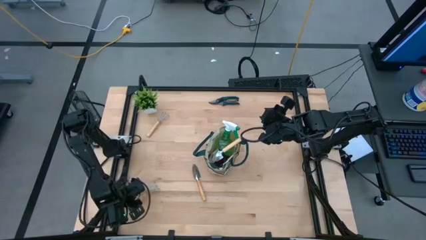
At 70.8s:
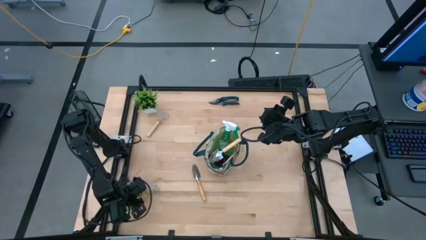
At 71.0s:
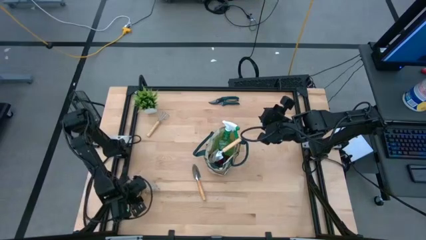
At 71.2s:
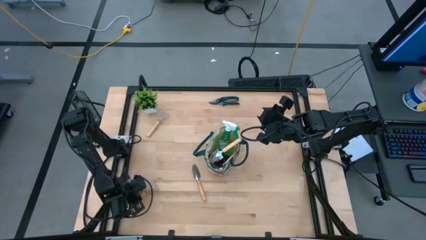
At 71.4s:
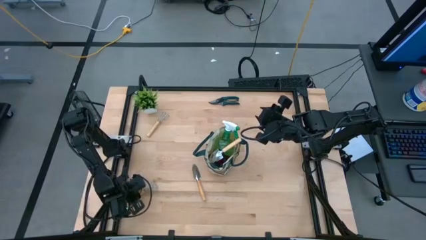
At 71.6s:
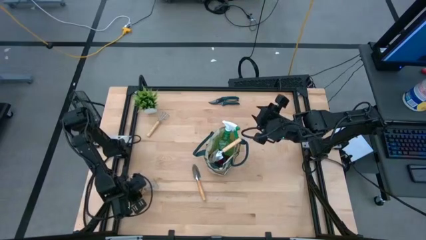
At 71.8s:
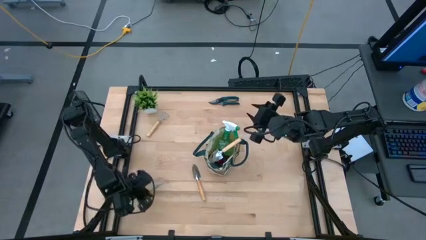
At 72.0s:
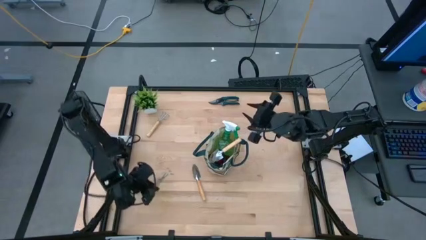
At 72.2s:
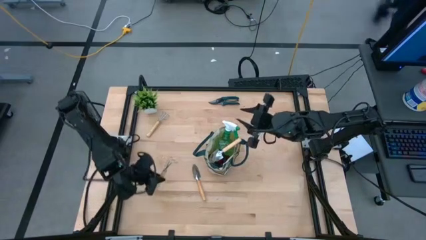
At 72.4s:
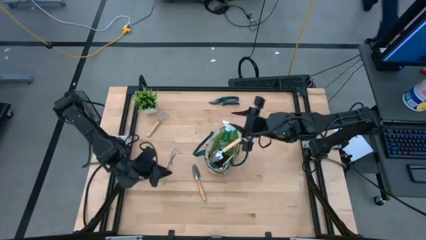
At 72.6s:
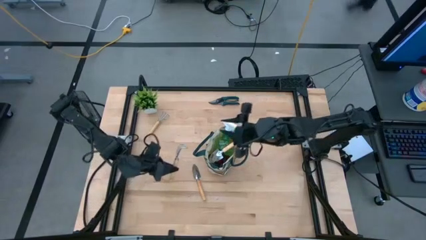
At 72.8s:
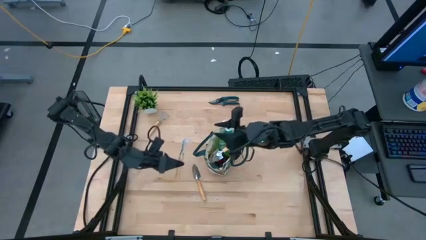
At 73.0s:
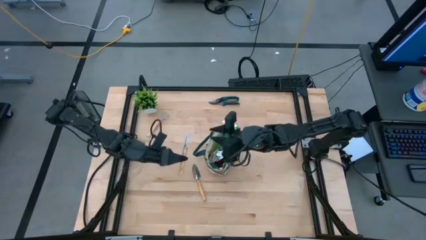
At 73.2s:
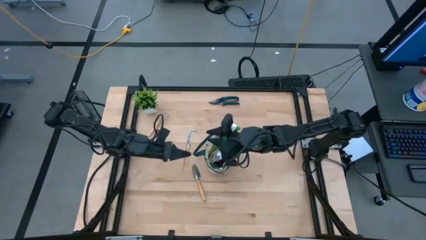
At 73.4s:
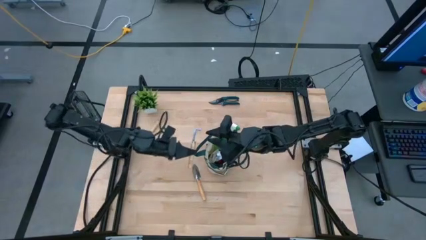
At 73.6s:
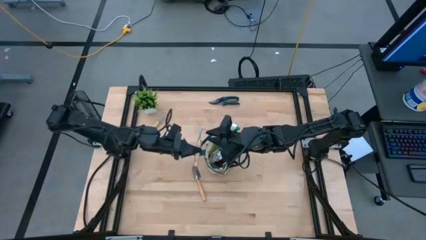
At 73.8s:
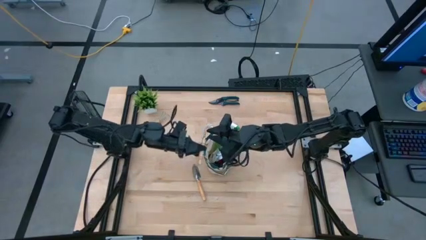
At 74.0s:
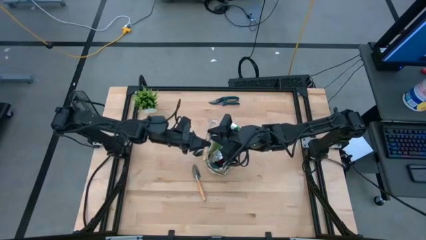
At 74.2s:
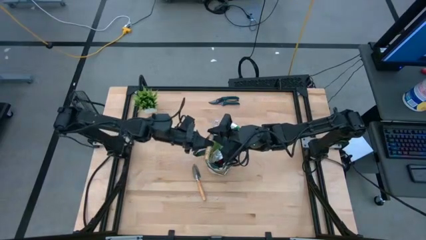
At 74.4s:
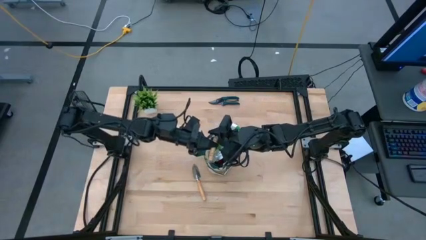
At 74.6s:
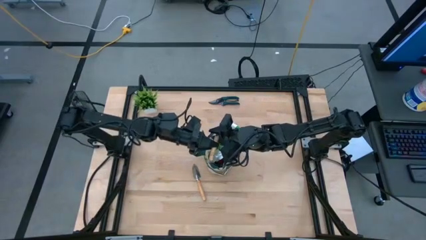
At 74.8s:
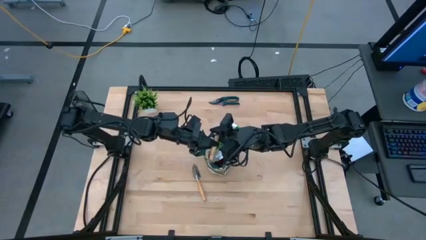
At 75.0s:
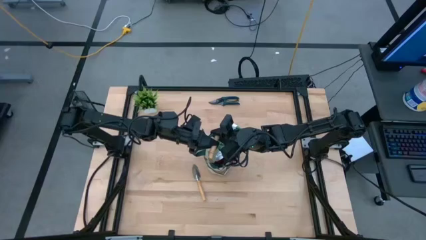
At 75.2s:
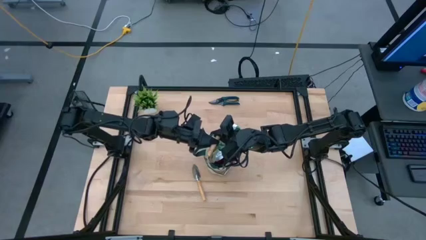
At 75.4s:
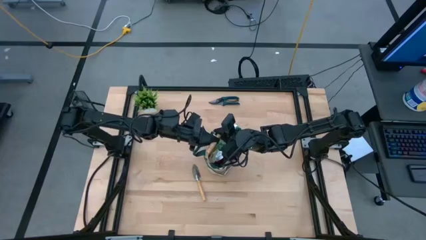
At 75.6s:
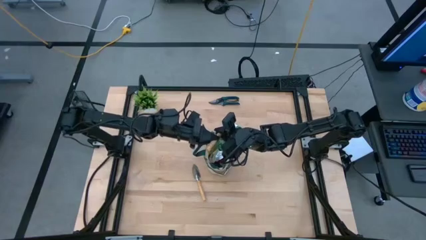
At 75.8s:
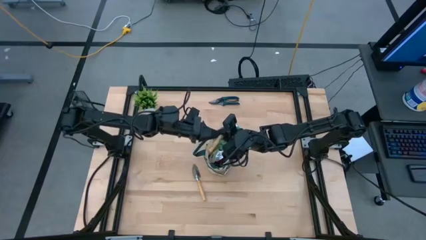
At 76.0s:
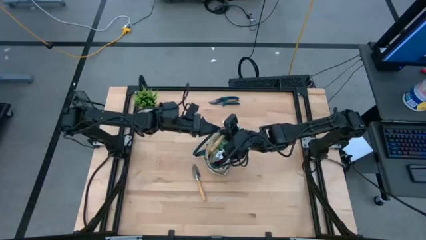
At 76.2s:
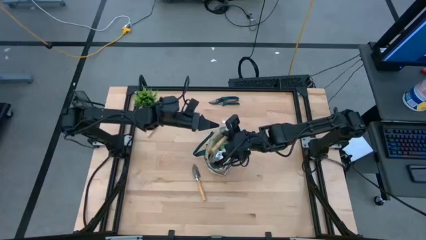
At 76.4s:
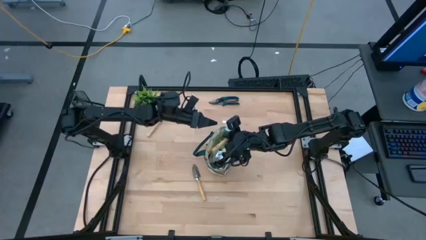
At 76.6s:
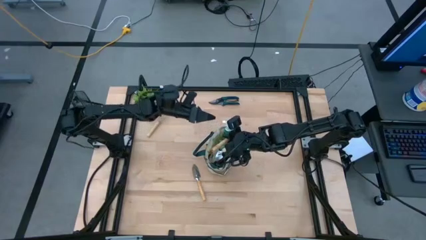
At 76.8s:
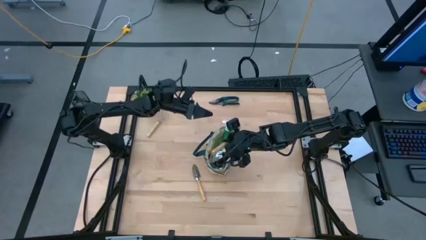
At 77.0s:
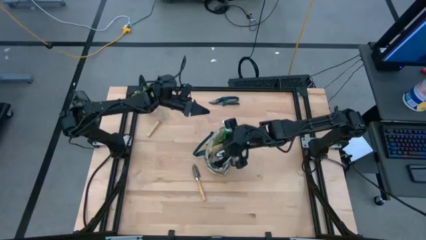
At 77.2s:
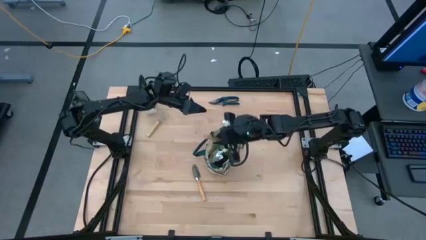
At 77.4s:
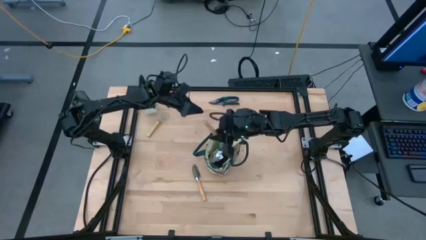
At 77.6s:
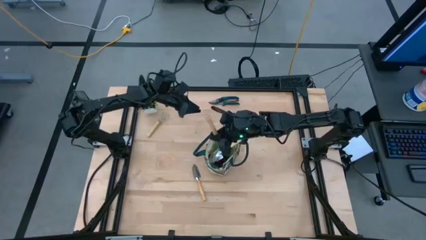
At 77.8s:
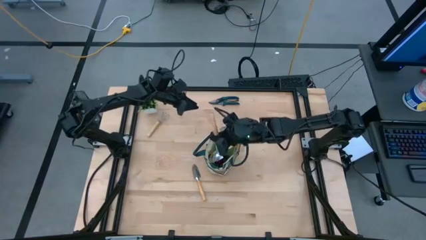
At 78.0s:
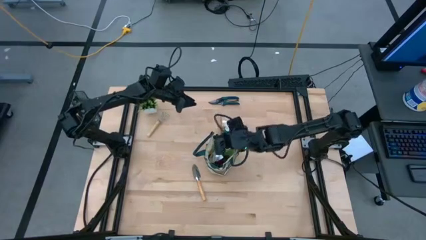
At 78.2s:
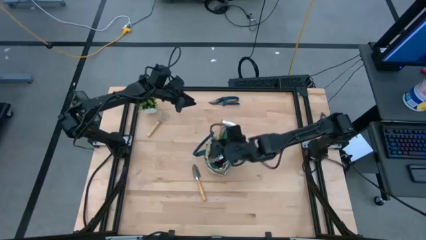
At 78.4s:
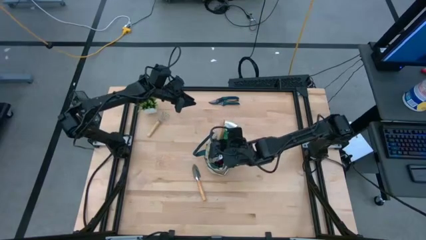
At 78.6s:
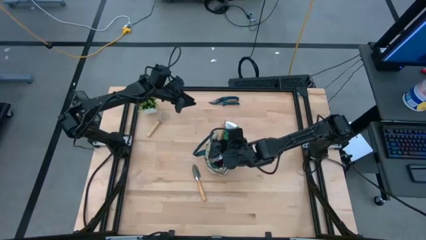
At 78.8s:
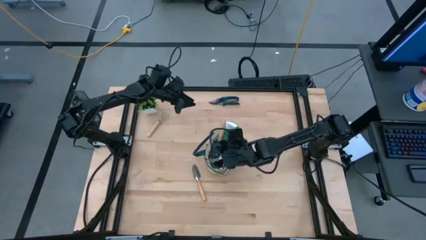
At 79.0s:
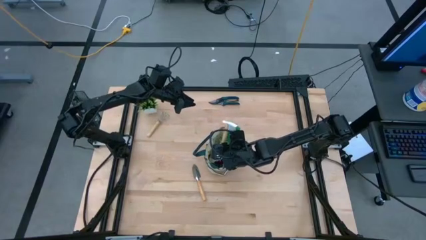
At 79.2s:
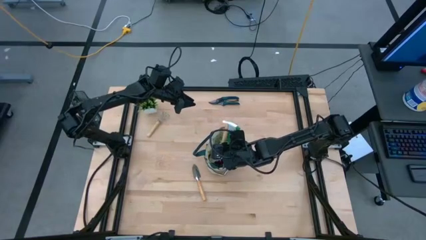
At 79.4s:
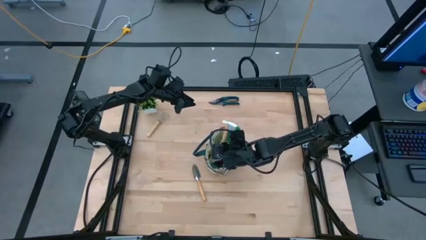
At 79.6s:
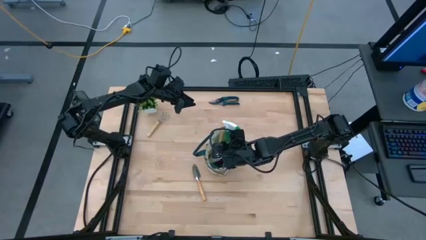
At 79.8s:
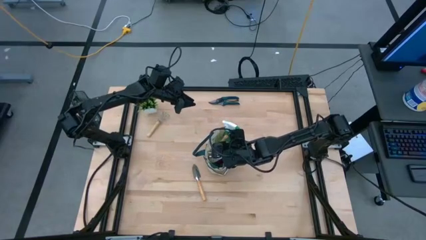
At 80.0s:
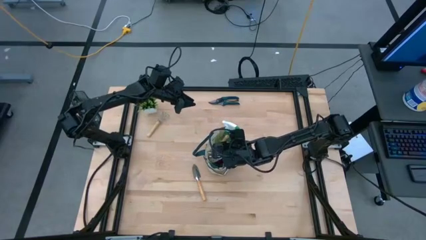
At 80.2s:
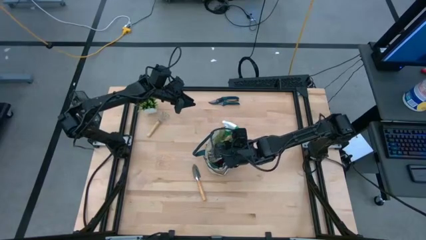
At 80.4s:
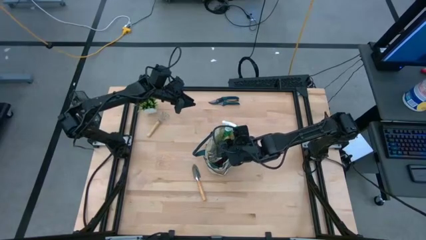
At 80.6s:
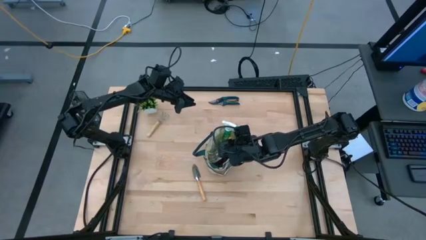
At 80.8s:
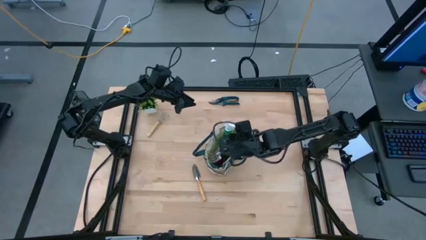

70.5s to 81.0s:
Task: Pick & Place Garden tools in Gardening bag
Put the bottom brown hand rake into the gardening bag

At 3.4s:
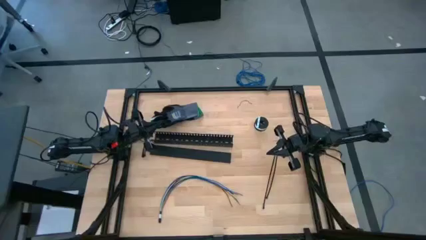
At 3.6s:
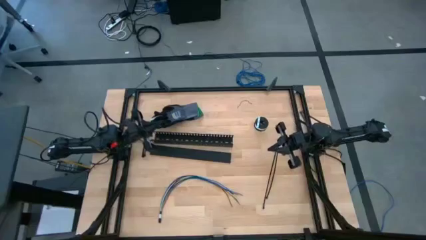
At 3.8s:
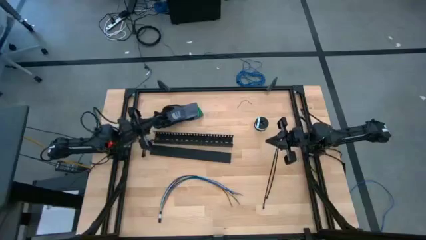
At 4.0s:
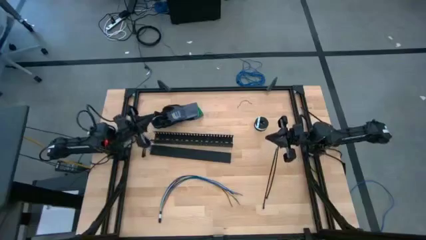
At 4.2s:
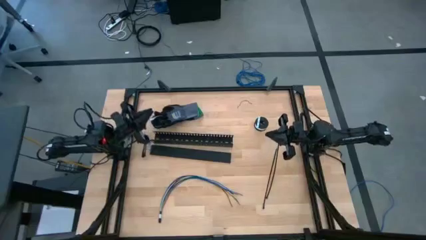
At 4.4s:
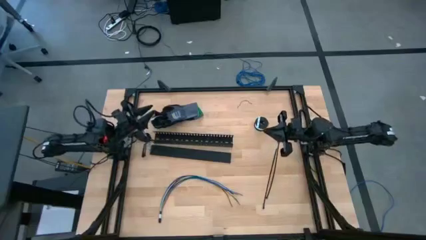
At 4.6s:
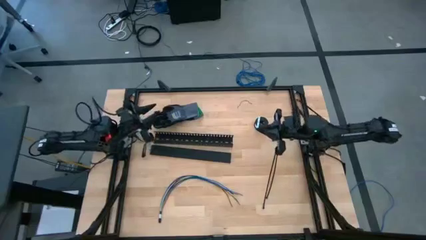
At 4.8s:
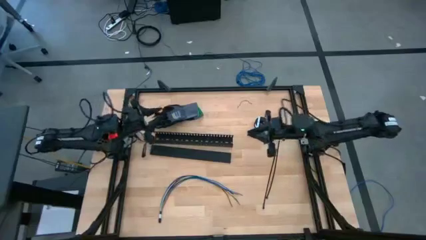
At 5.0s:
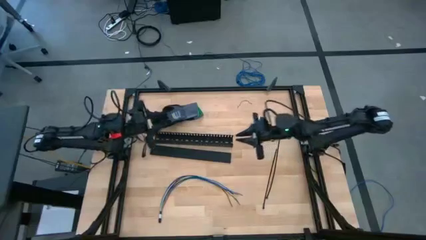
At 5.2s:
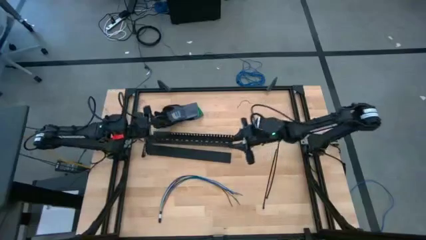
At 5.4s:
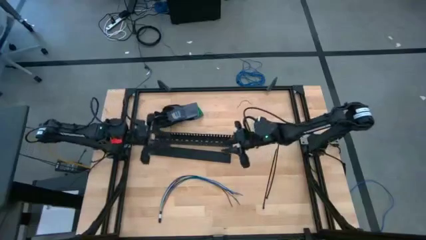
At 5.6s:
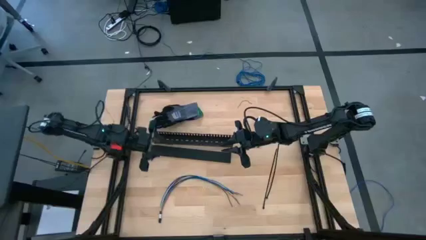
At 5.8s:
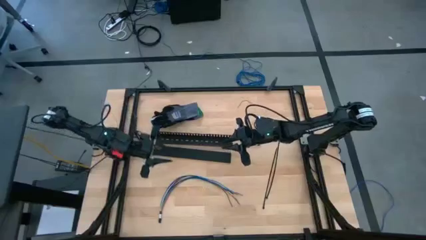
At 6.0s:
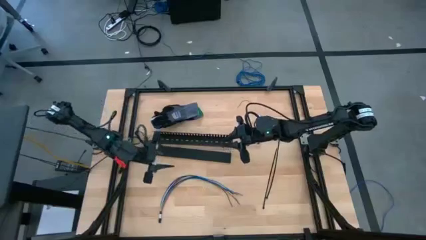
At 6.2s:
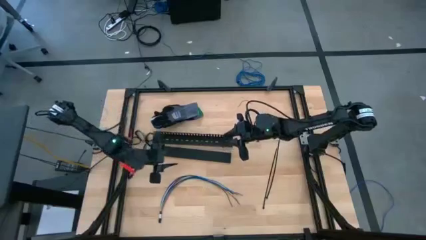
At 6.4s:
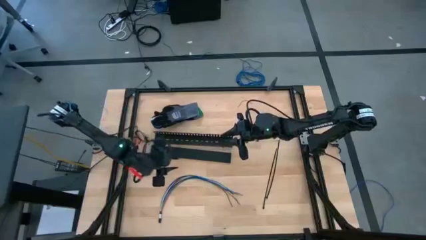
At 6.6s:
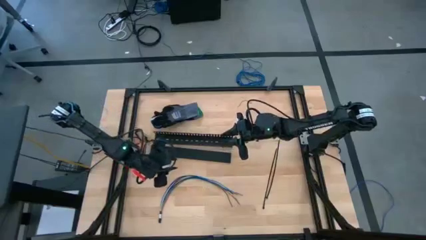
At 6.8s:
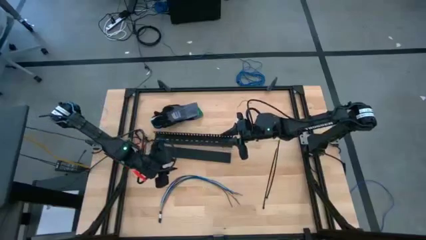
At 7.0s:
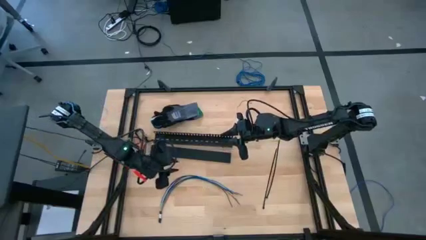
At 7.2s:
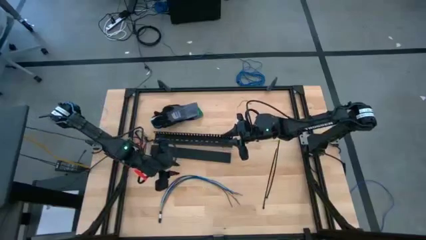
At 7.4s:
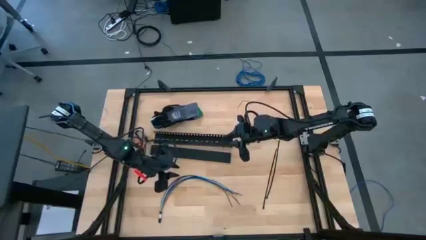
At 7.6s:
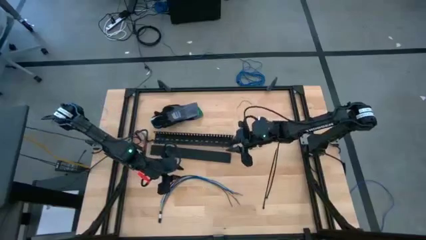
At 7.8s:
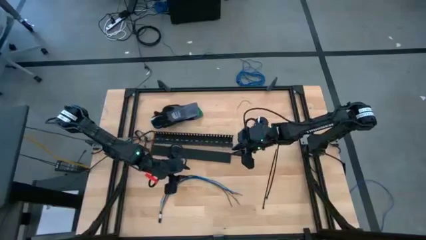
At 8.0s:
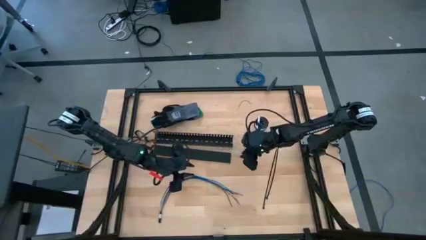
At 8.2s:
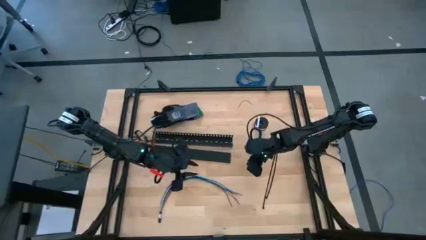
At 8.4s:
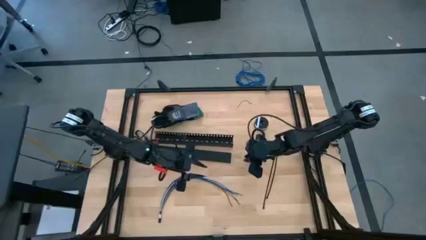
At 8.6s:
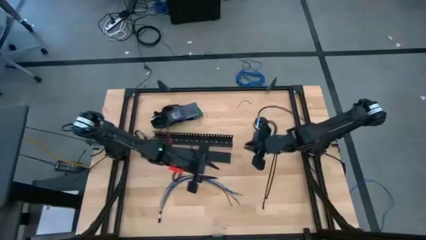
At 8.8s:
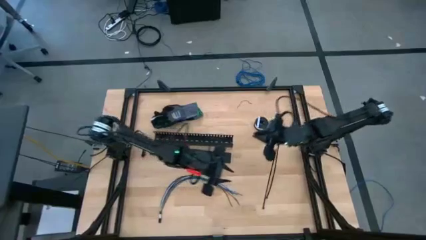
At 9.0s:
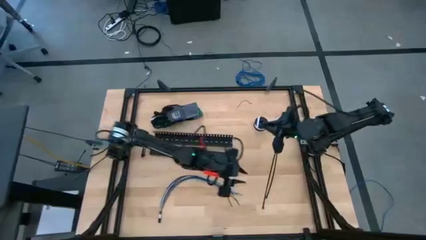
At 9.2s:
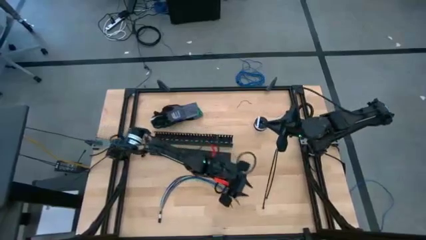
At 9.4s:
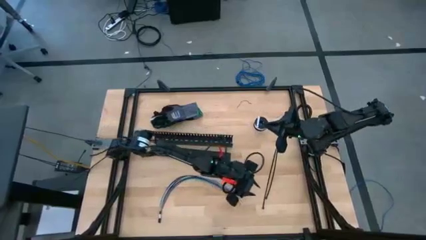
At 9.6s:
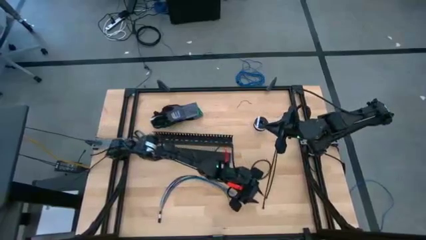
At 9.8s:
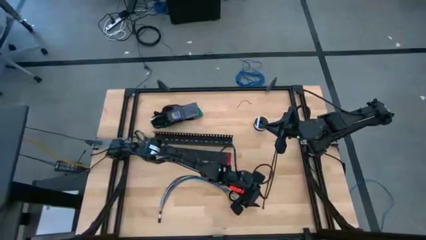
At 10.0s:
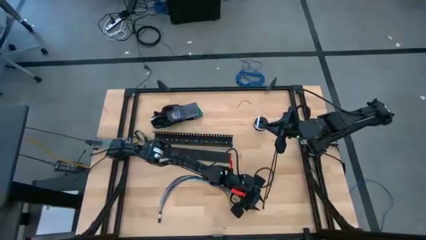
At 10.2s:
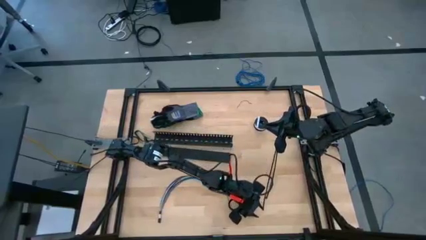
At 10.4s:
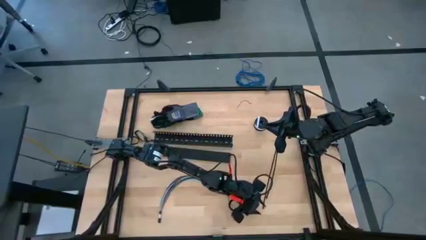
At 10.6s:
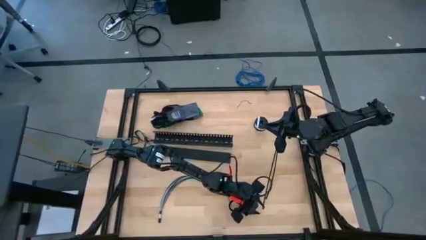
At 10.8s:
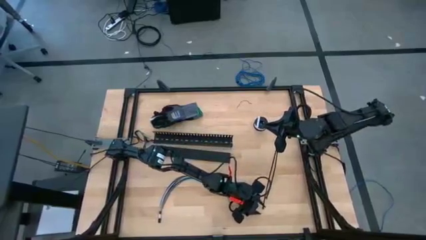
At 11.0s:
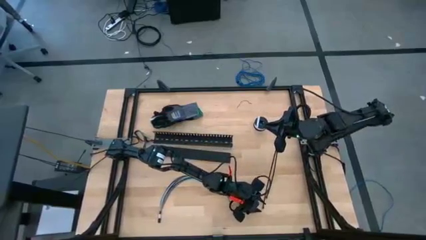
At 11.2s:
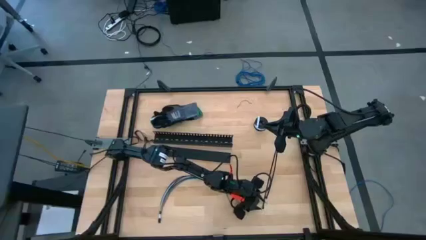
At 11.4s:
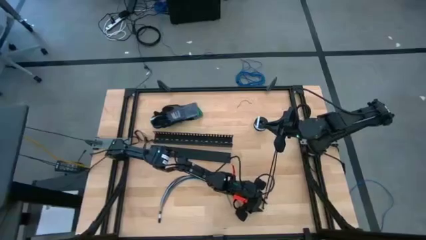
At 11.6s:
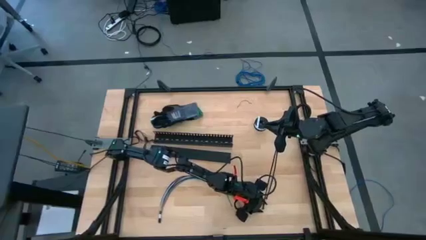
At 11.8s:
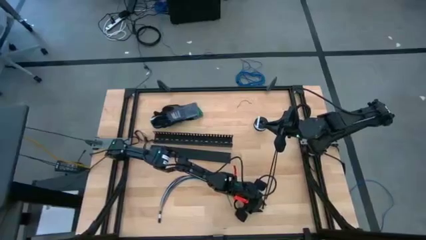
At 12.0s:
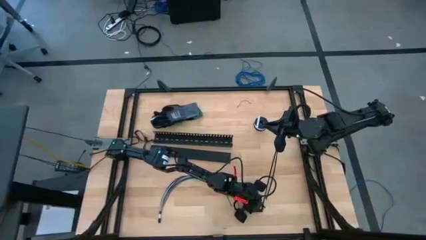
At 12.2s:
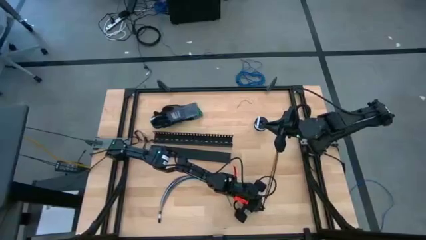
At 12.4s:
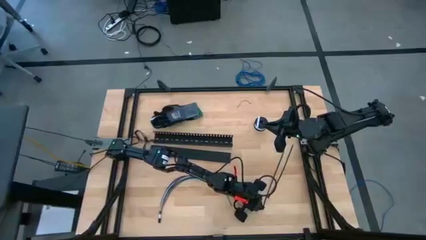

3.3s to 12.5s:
Task: Ziptie cables
Prepare the left black zip tie
